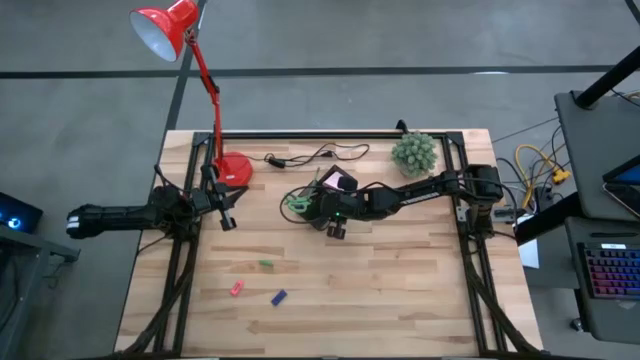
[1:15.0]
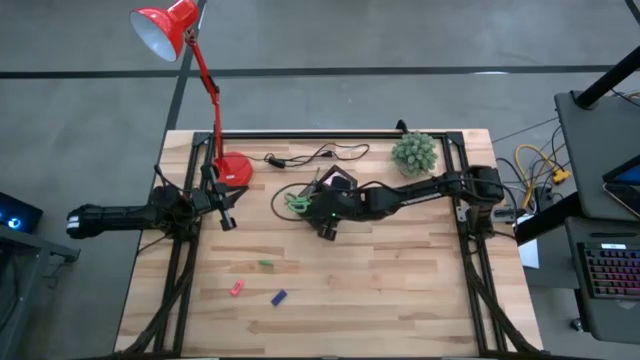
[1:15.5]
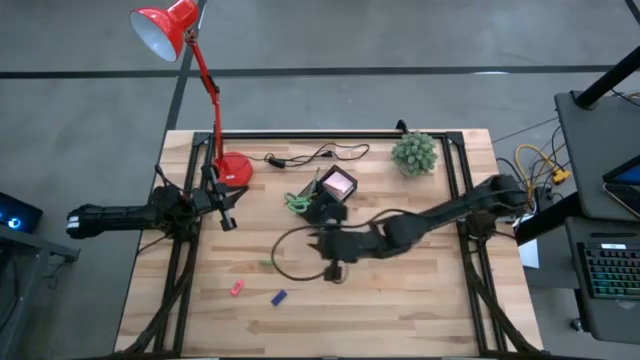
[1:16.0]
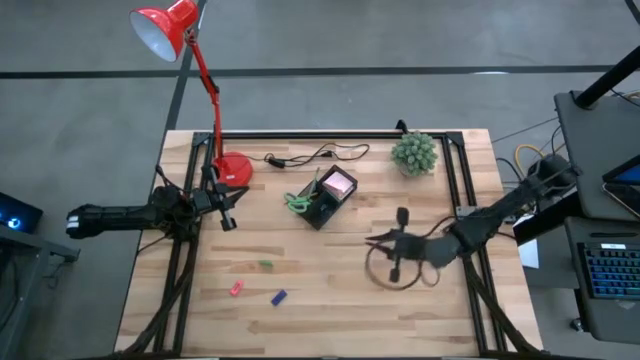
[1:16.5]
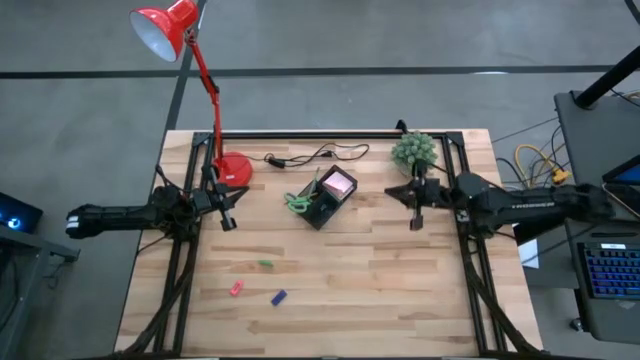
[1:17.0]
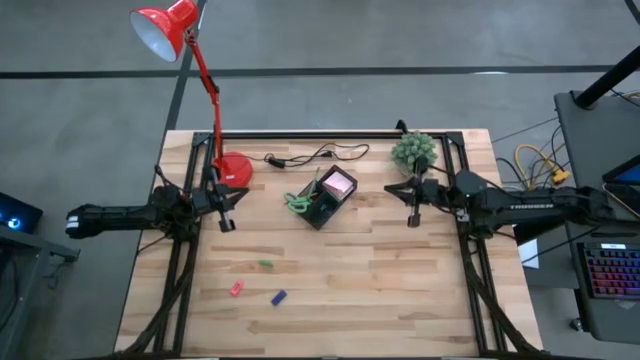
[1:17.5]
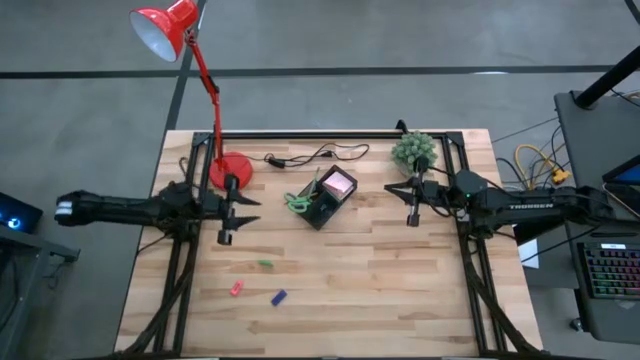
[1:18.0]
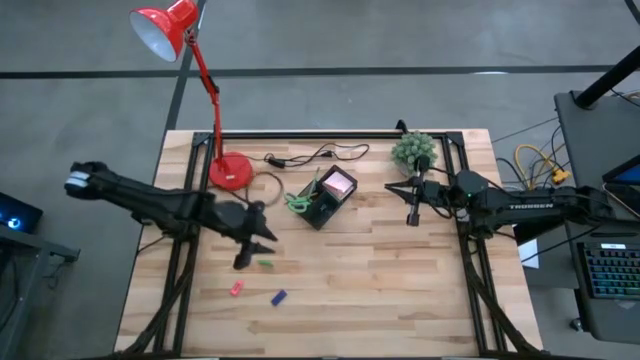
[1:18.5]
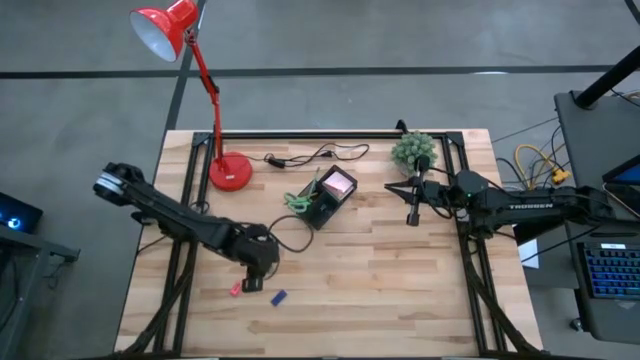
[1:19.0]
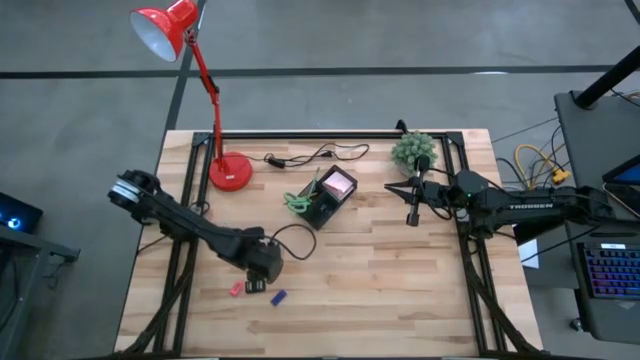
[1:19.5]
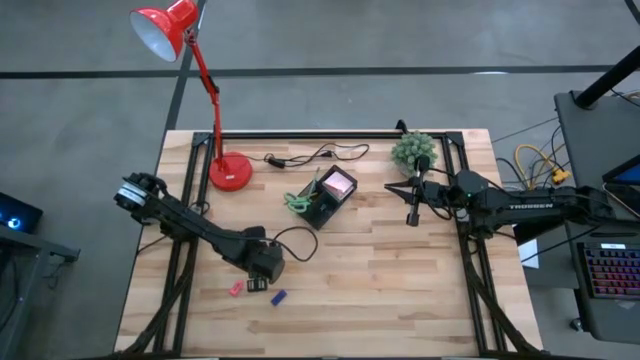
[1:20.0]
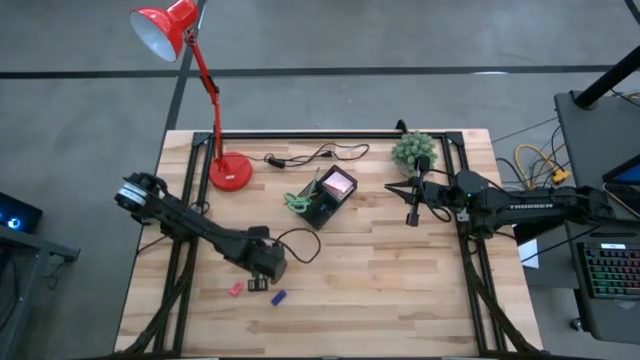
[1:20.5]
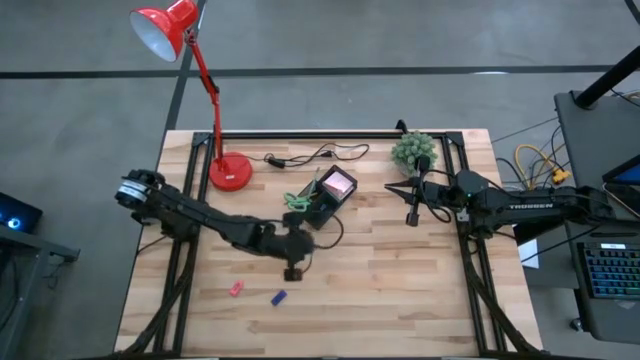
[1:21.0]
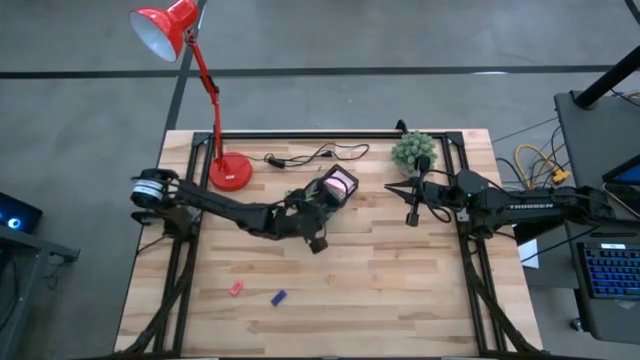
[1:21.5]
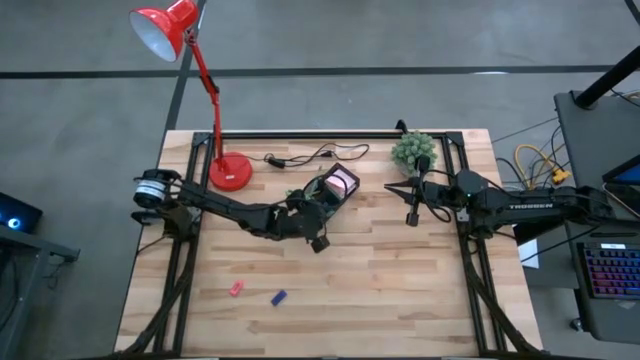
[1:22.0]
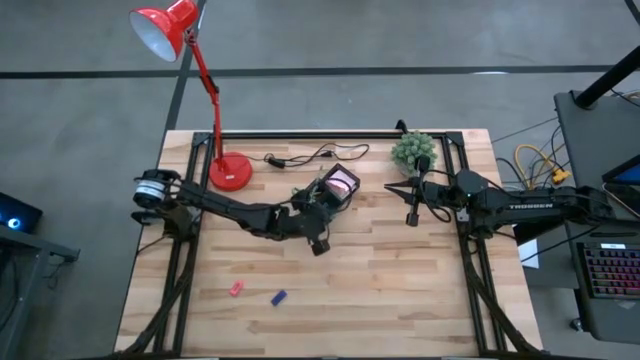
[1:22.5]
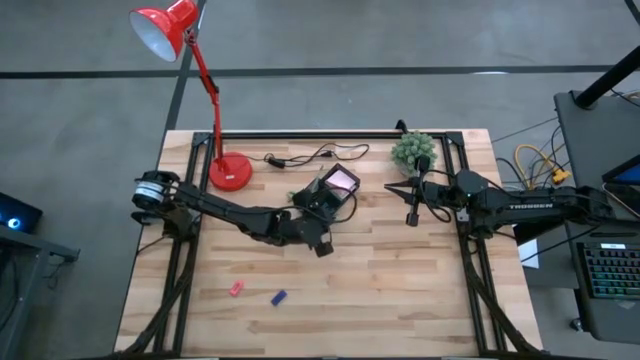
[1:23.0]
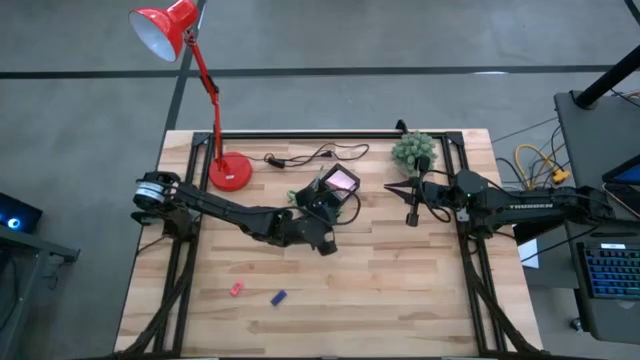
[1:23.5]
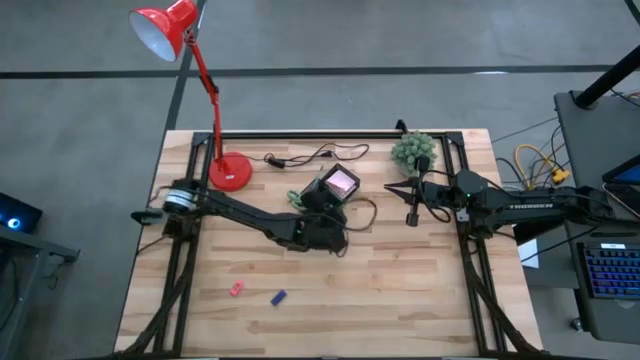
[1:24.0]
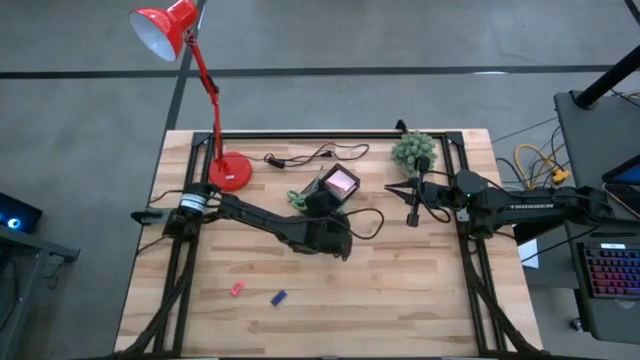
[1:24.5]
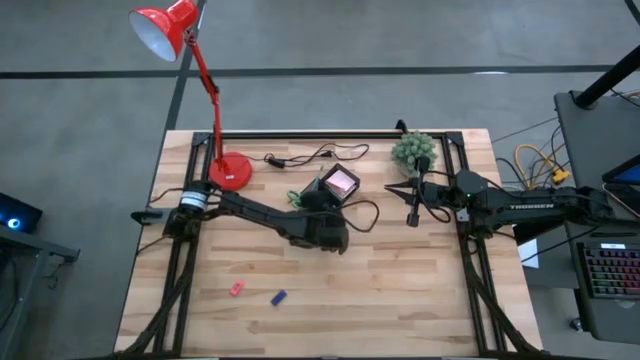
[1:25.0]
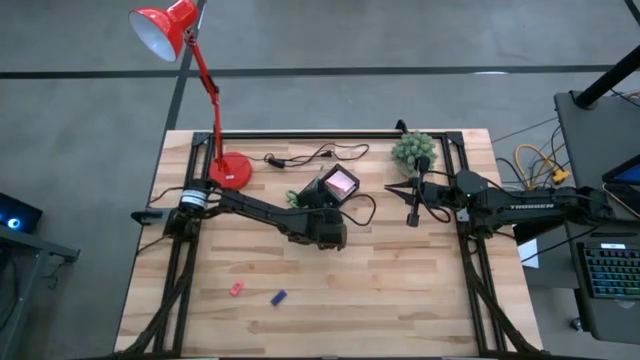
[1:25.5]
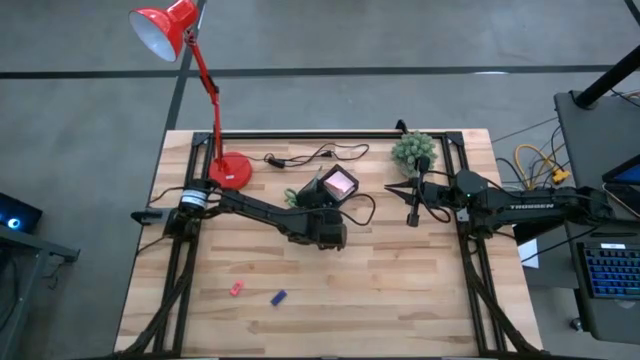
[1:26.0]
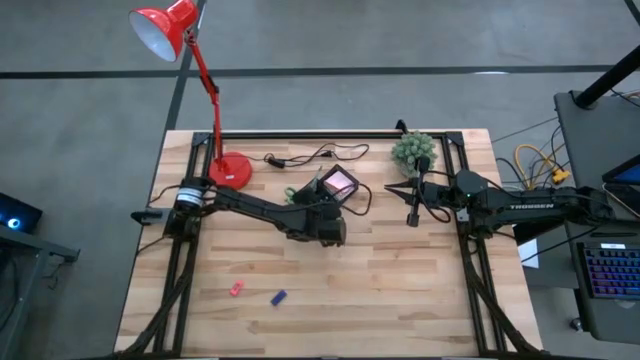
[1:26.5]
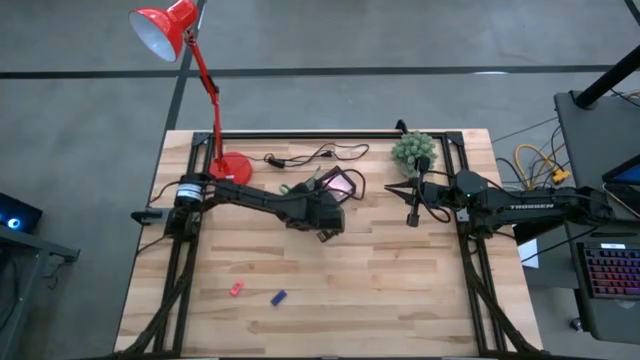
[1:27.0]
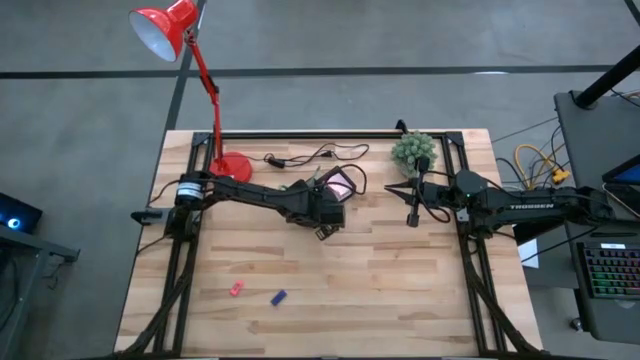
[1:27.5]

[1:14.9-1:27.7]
Task: Pick and place office supplies into organizer
Put the green eraser into the black desk organizer

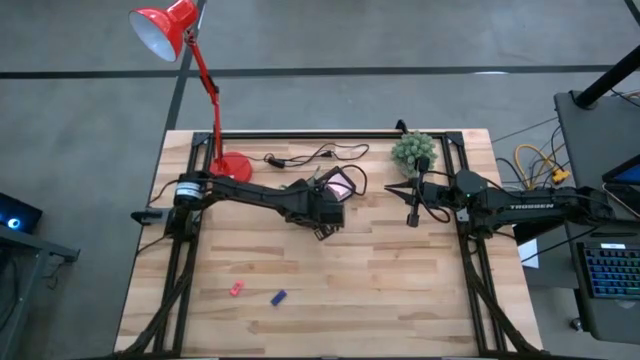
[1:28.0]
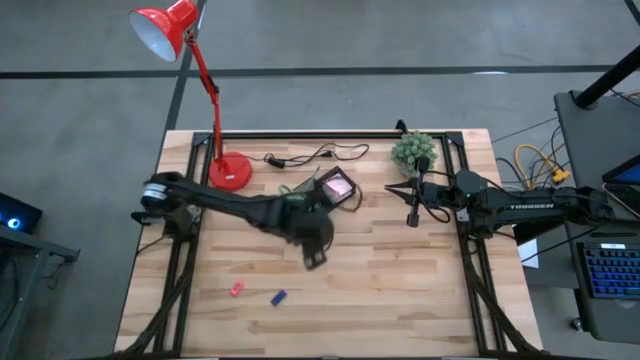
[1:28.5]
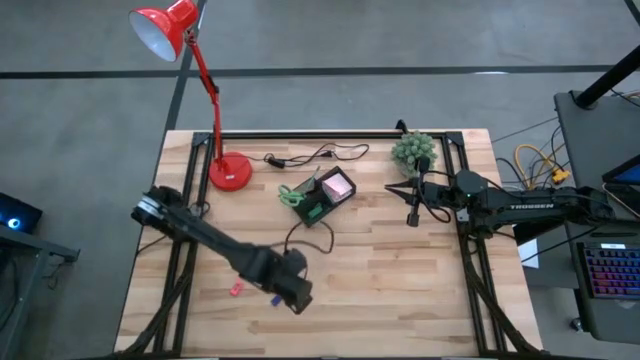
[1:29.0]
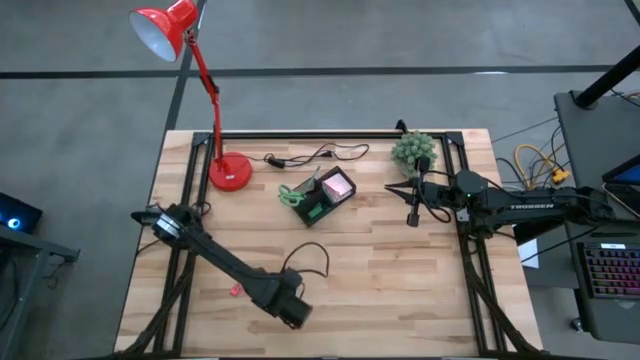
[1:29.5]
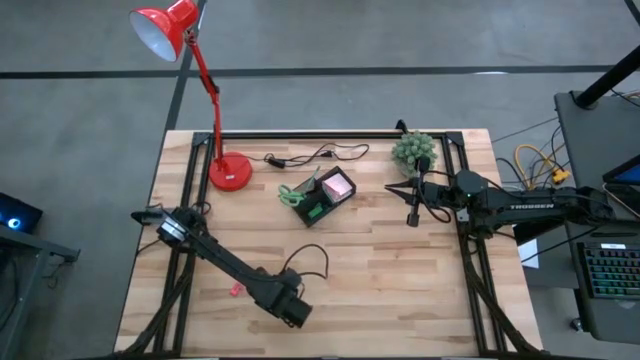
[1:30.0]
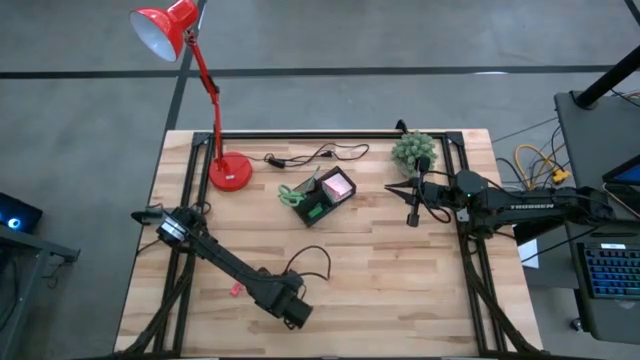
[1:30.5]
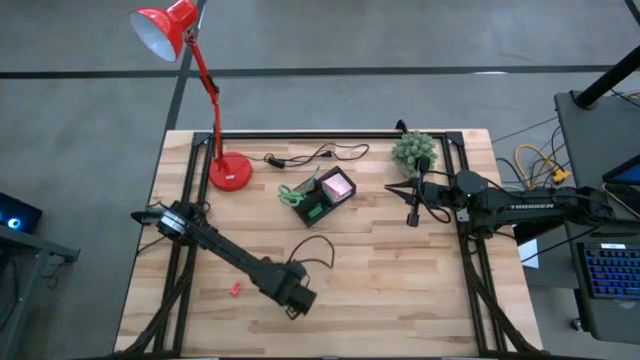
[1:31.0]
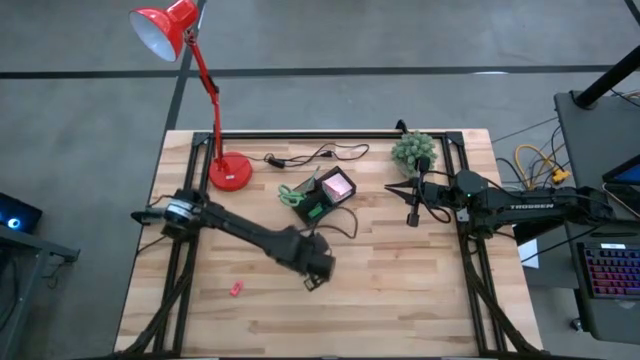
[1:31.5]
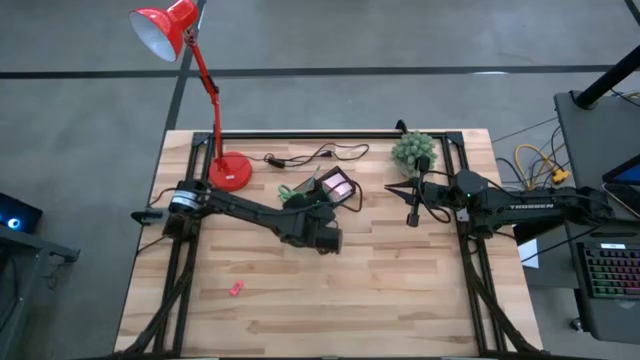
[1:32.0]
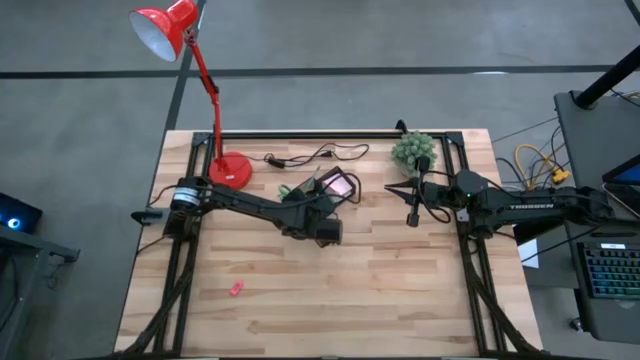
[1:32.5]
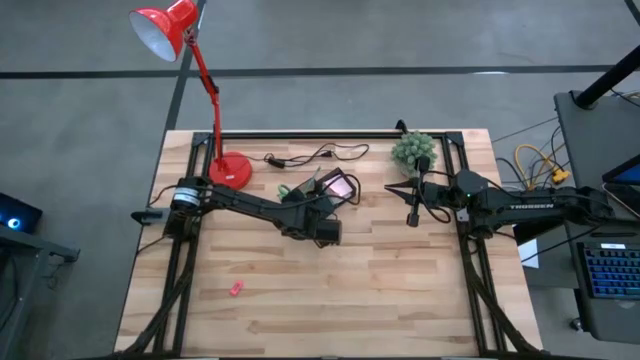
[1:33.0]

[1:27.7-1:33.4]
Put the blue eraser into the black desk organizer

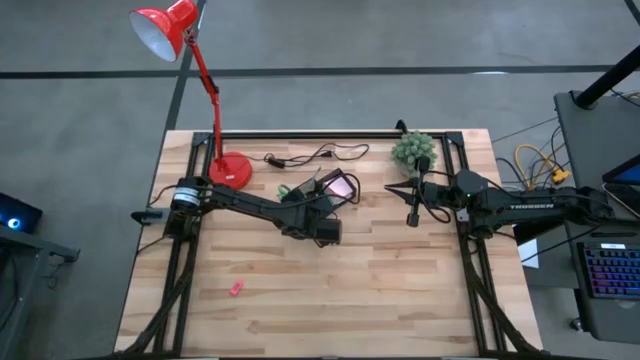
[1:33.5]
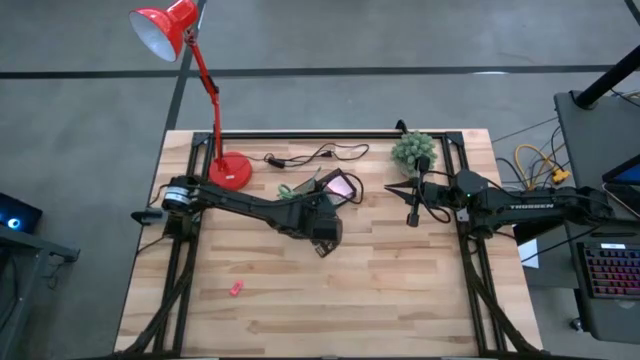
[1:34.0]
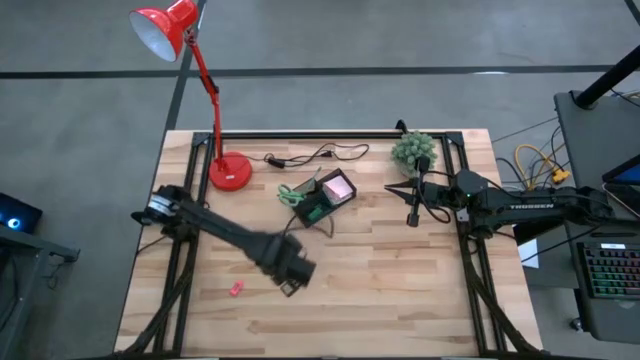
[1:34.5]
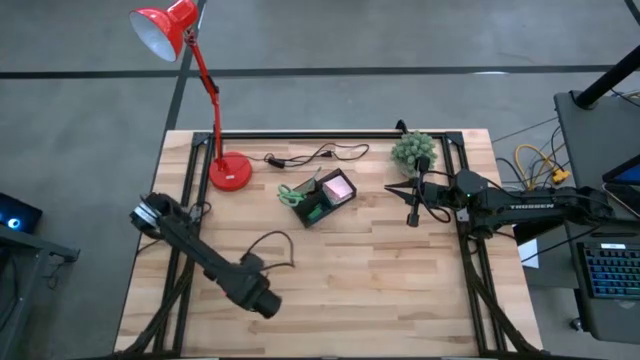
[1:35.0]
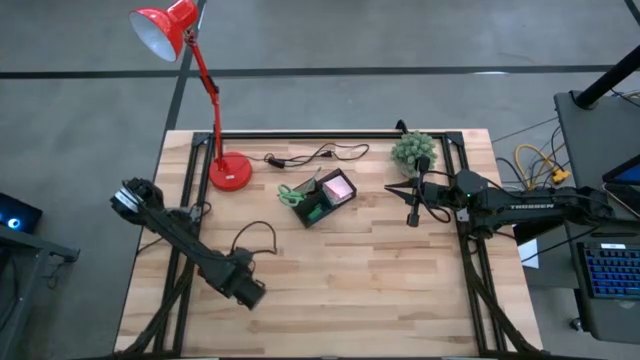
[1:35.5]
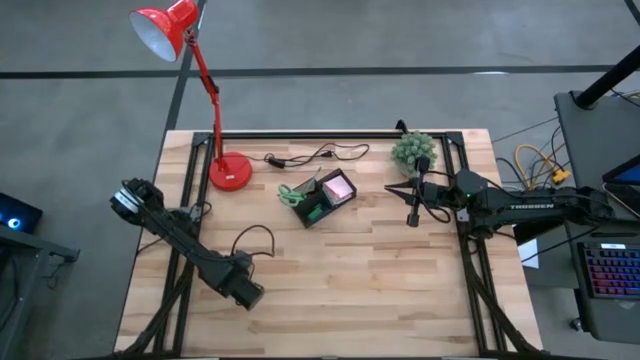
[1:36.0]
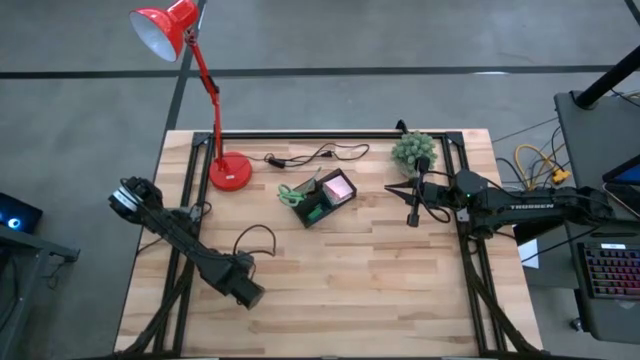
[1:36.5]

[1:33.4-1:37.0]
Put the pink eraser into the black desk organizer
